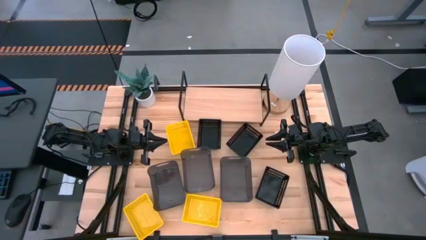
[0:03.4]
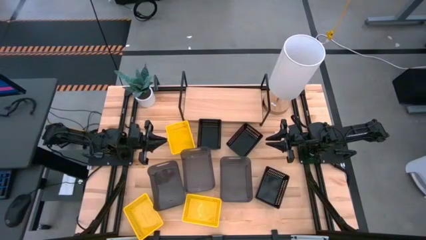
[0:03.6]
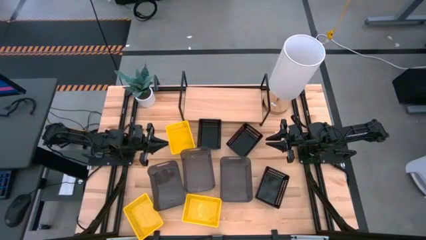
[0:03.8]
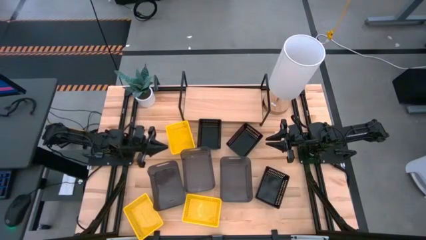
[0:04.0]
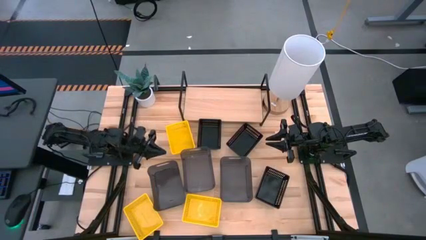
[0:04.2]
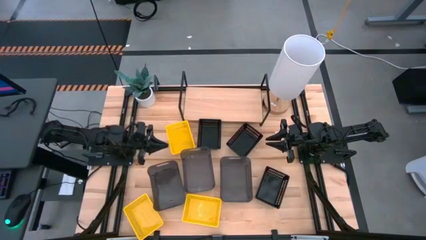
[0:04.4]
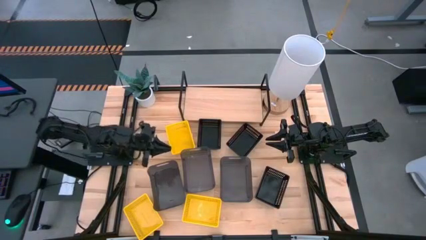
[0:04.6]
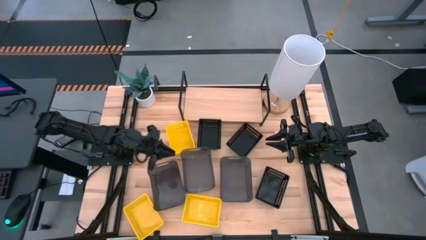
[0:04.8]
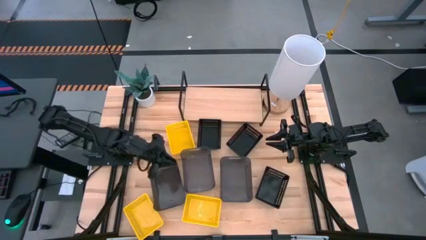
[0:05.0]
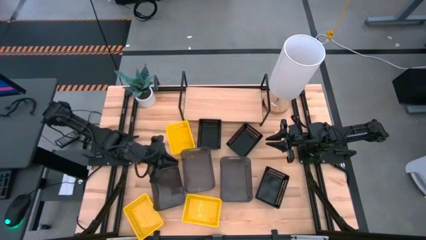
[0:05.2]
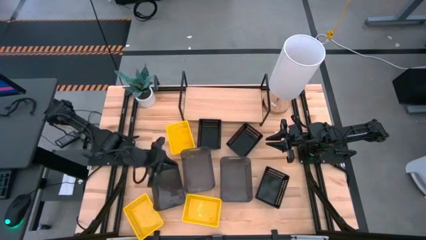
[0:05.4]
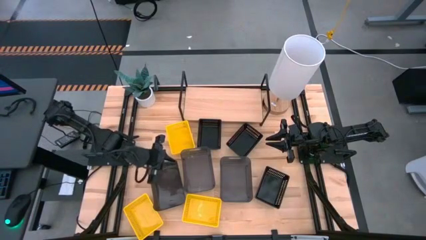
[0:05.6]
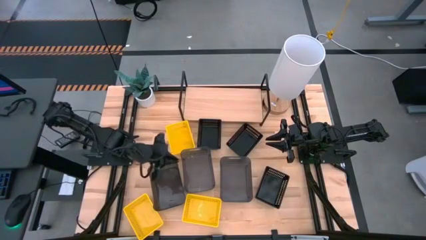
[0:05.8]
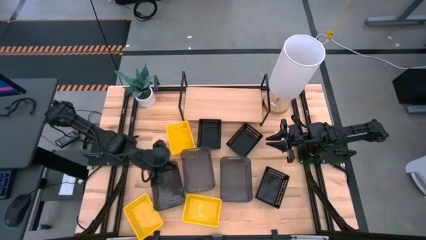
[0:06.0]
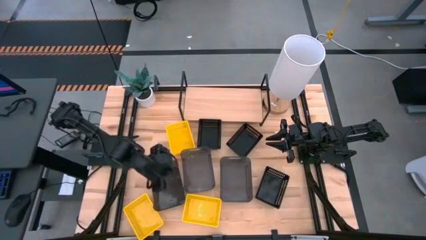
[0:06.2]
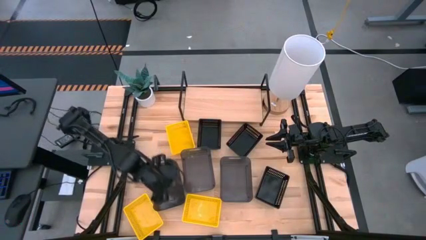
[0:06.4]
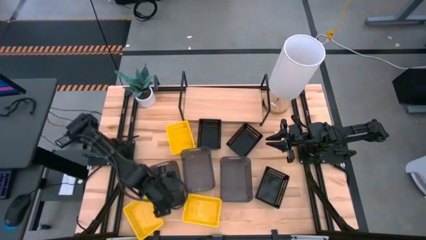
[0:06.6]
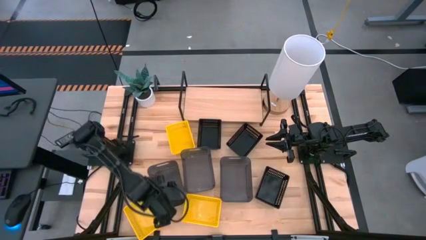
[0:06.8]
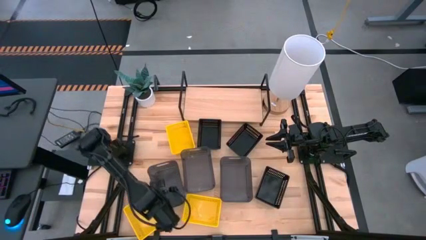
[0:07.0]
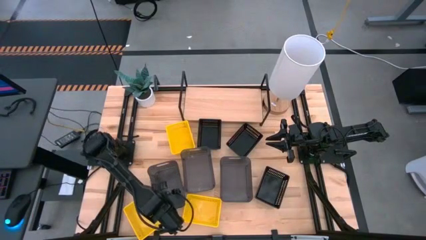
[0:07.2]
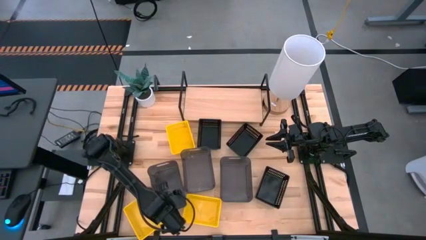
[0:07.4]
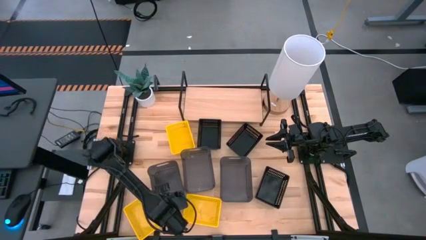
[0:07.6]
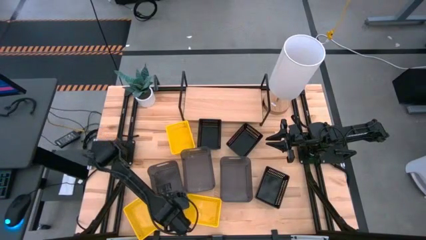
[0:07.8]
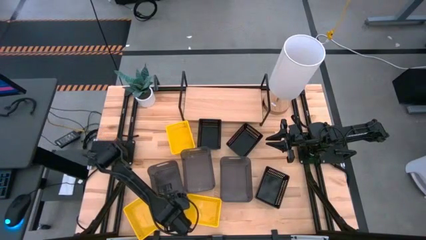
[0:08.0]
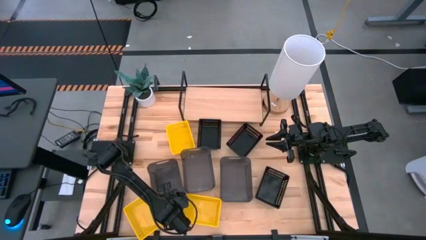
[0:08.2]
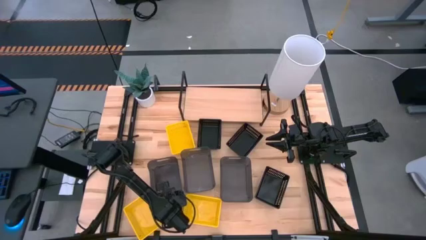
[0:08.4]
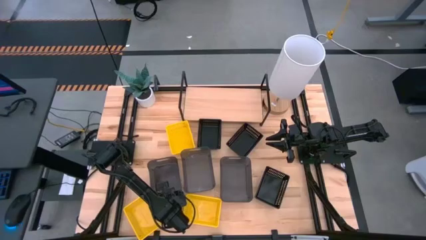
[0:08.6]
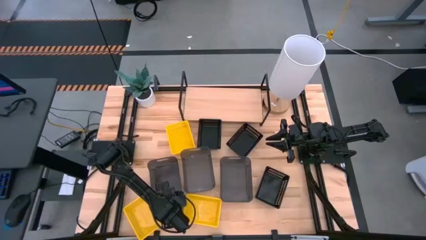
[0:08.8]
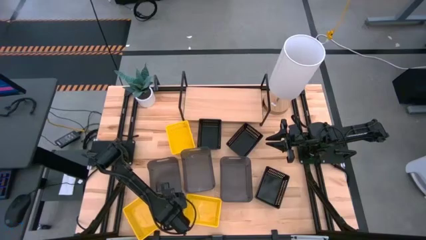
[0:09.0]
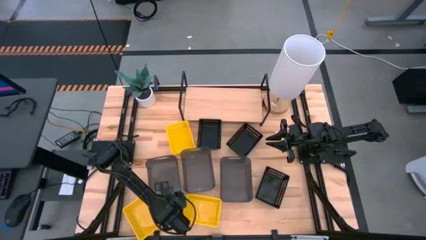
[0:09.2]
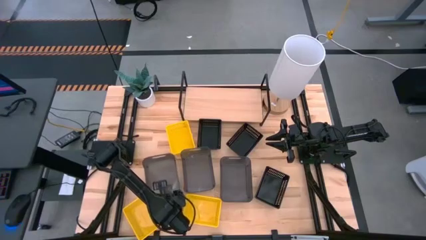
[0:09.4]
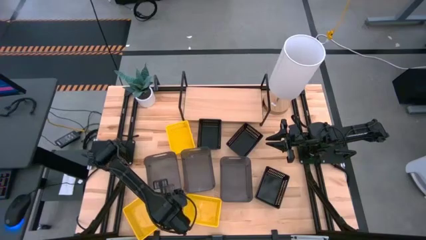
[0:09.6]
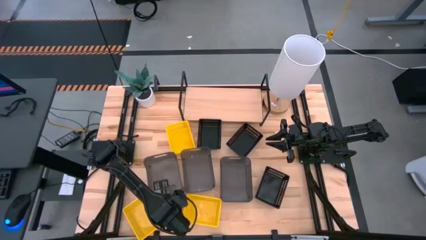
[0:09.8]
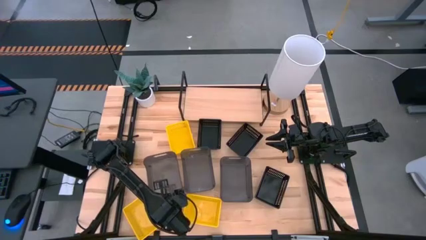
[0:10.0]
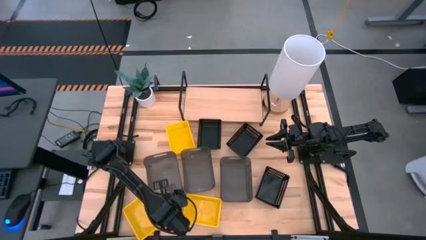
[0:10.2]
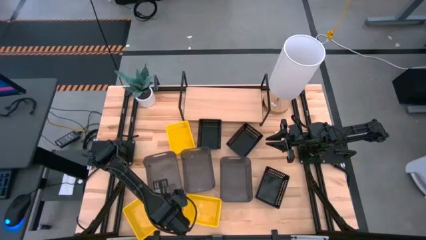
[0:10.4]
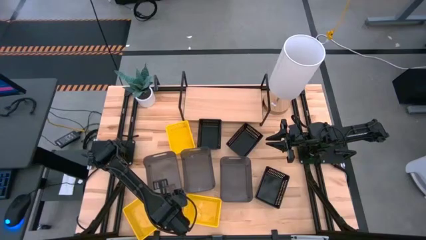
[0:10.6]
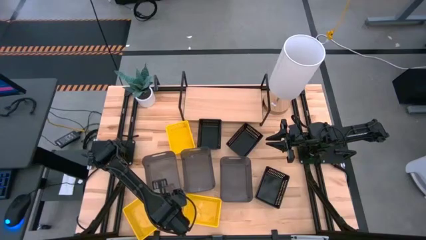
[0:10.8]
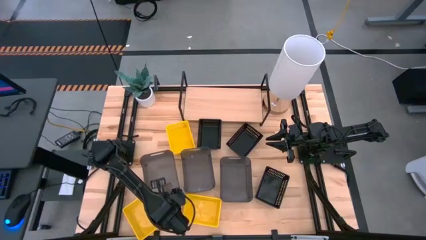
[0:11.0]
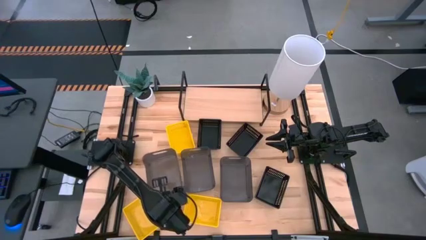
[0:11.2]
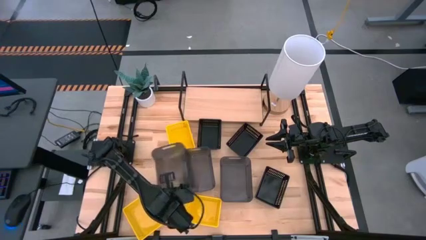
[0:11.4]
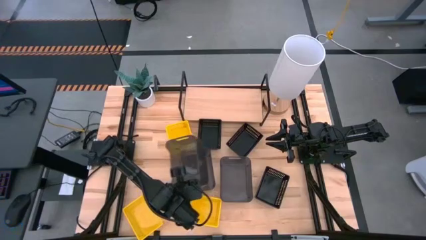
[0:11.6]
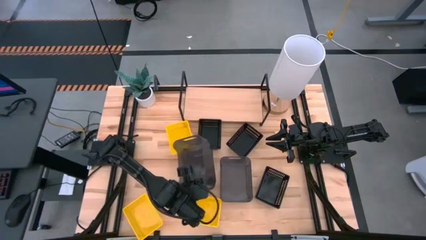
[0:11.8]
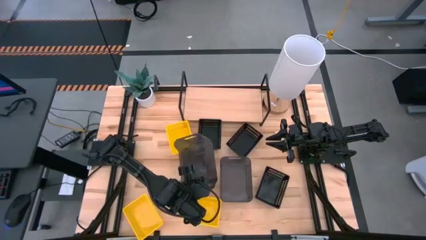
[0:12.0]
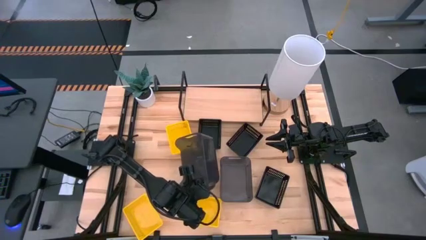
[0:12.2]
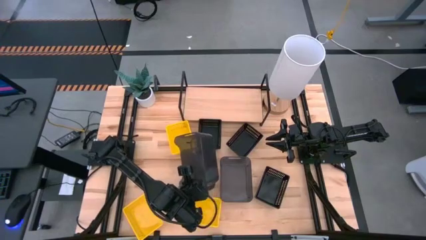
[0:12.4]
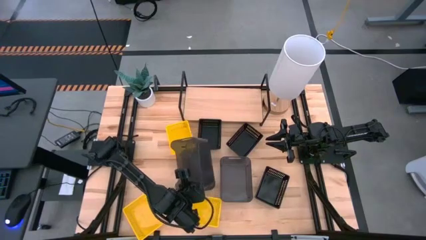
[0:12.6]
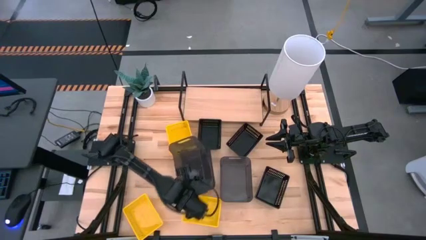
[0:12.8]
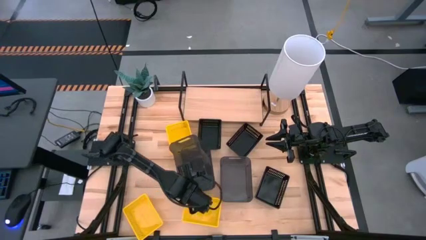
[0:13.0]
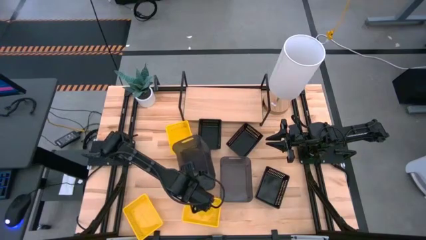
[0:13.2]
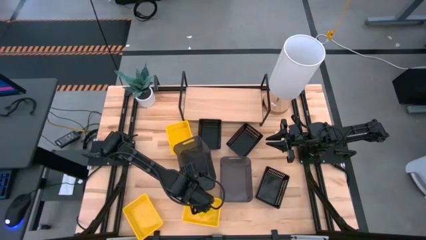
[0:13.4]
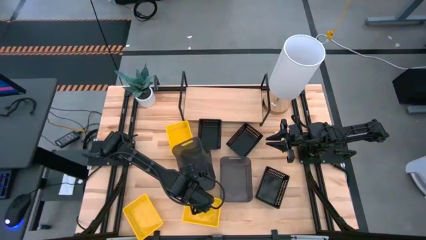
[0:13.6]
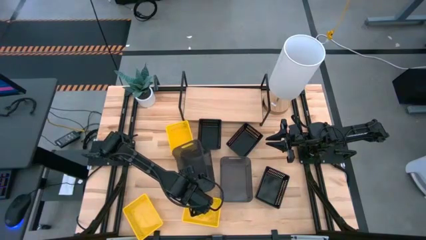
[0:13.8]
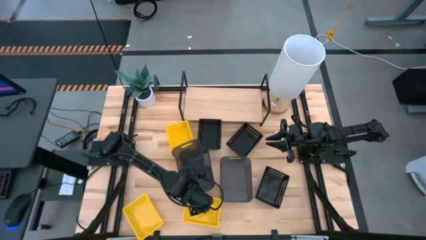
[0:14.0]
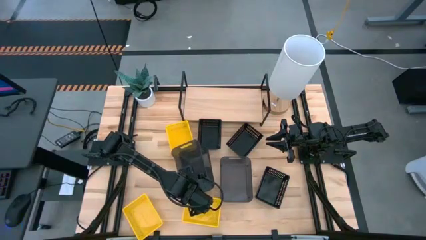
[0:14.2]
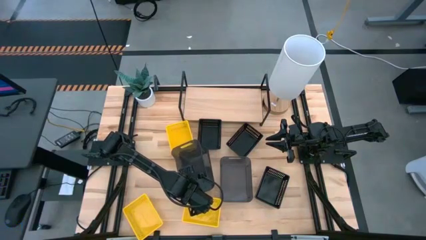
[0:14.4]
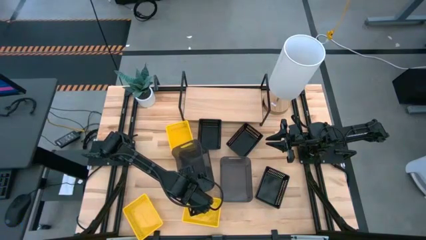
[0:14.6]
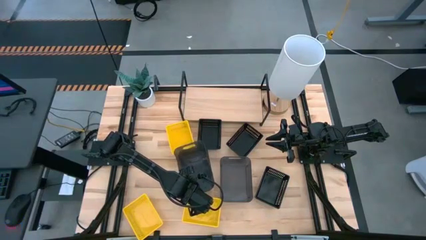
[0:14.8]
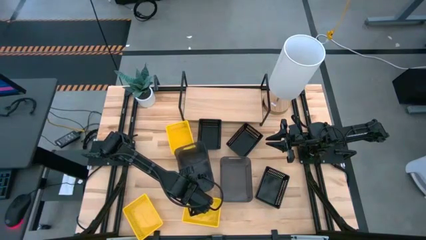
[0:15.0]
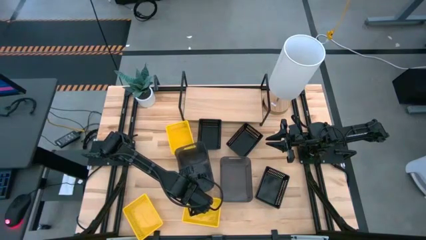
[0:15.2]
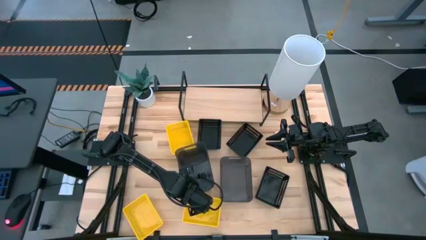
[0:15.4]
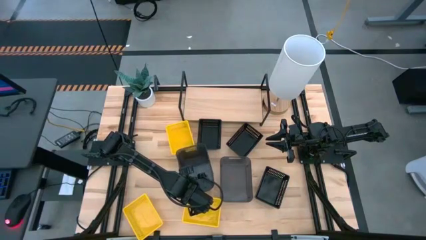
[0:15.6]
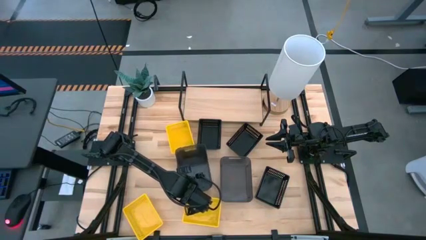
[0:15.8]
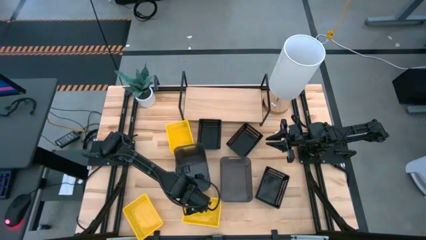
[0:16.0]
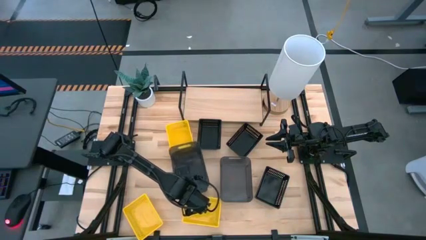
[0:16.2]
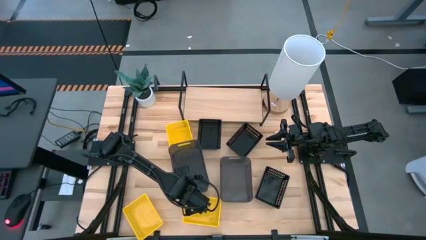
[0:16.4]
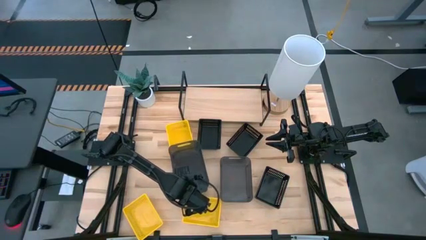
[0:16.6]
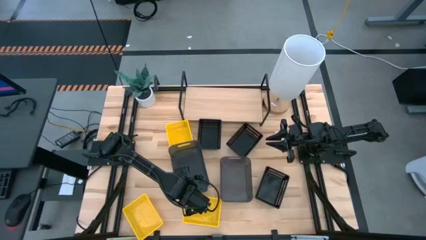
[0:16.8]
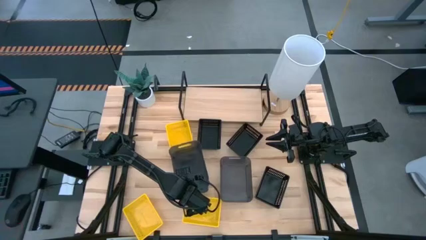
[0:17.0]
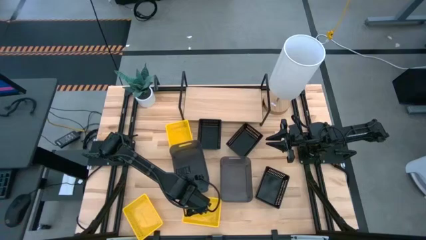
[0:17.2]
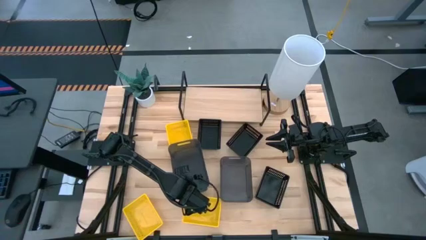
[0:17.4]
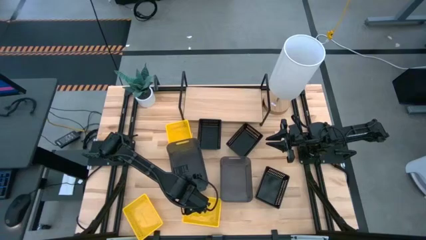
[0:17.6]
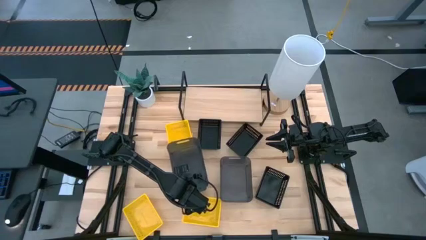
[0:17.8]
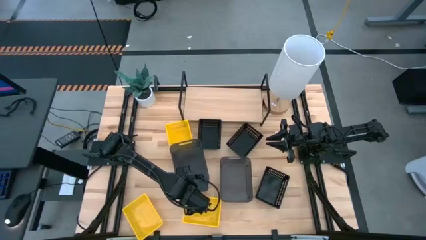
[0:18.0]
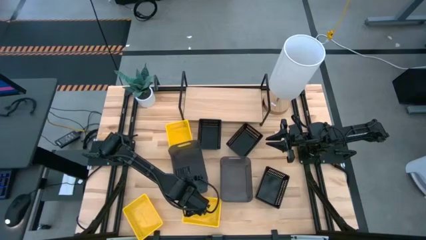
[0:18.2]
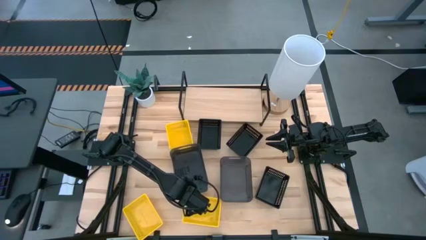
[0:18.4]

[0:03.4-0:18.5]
Task: Stack baskets on shelf by color
Stack the left gray bin on the middle gray bin
